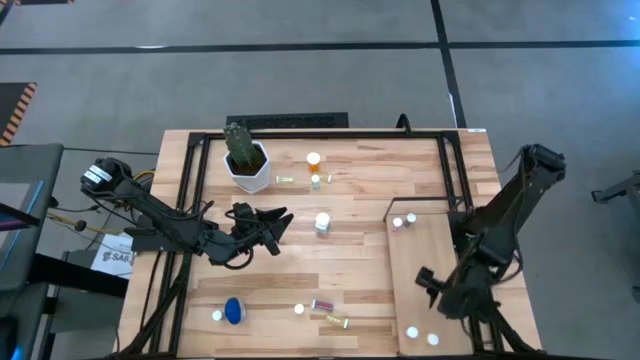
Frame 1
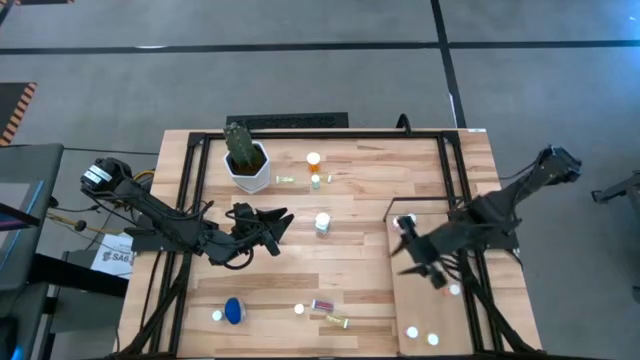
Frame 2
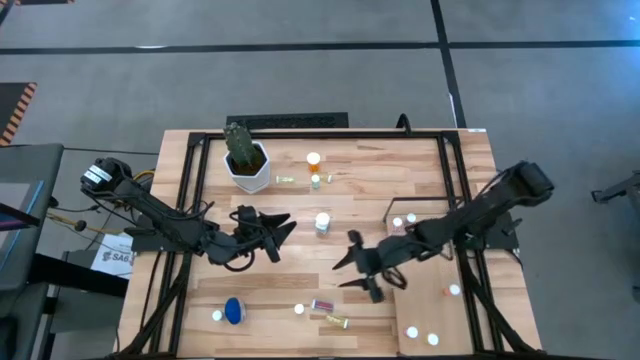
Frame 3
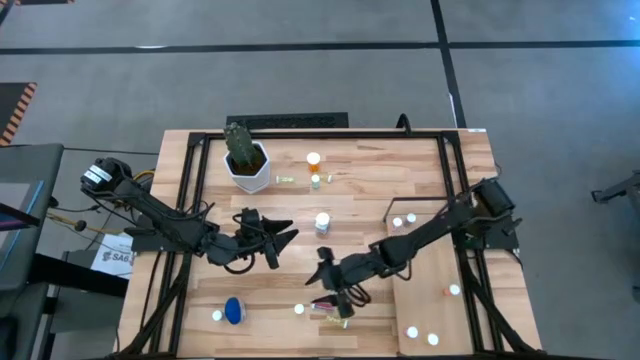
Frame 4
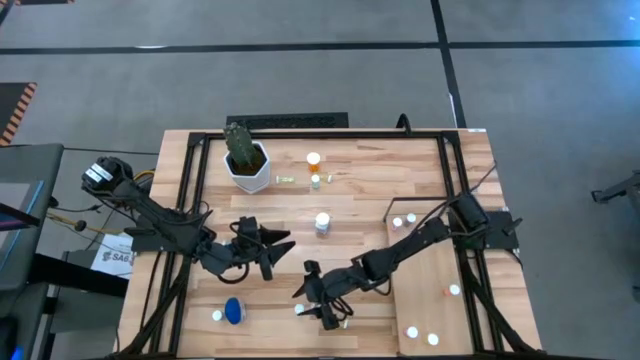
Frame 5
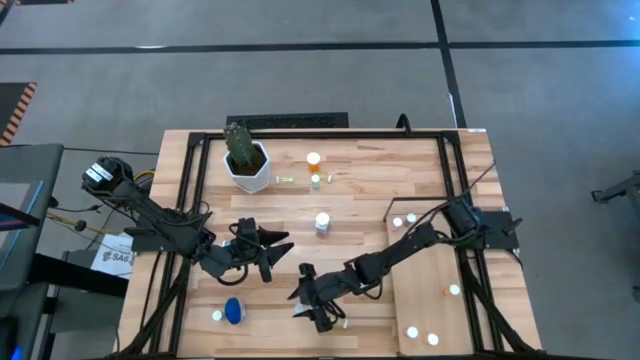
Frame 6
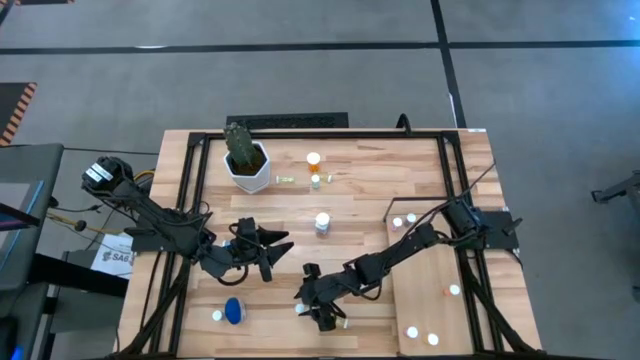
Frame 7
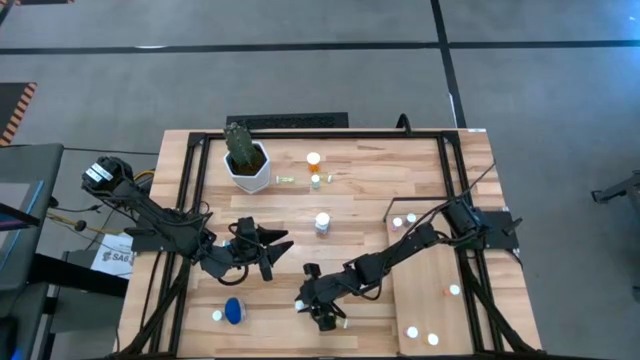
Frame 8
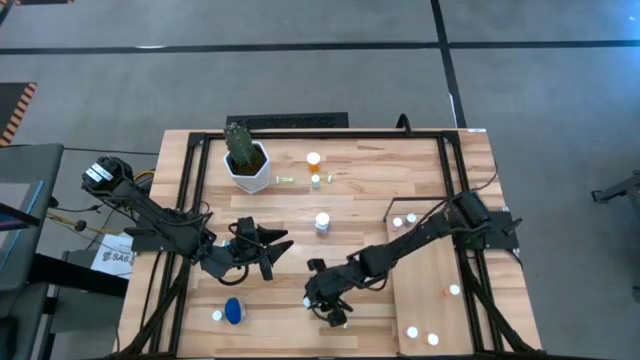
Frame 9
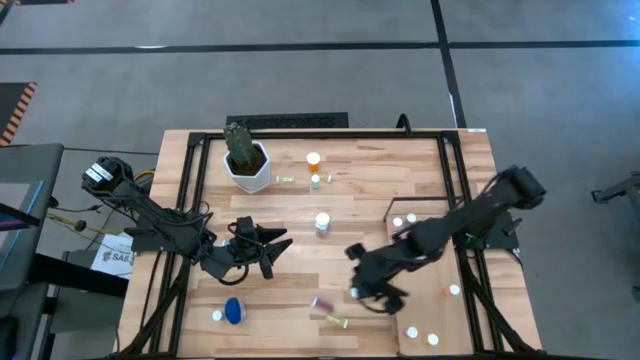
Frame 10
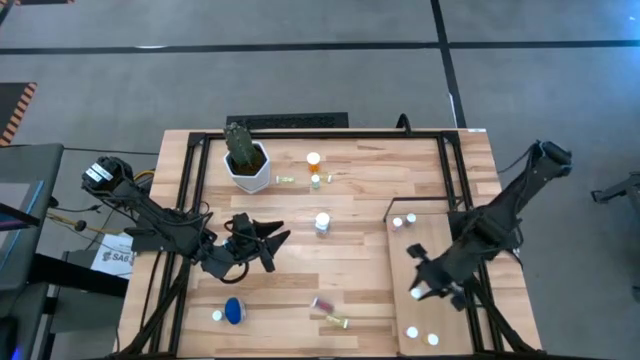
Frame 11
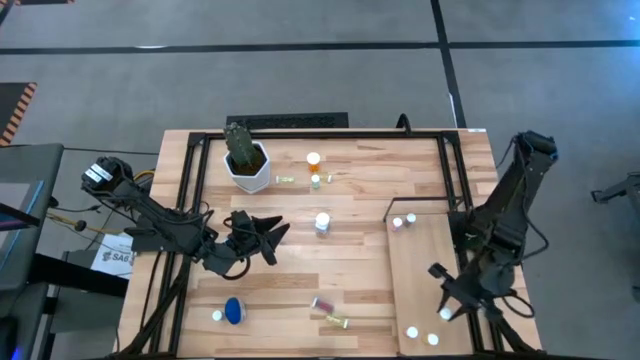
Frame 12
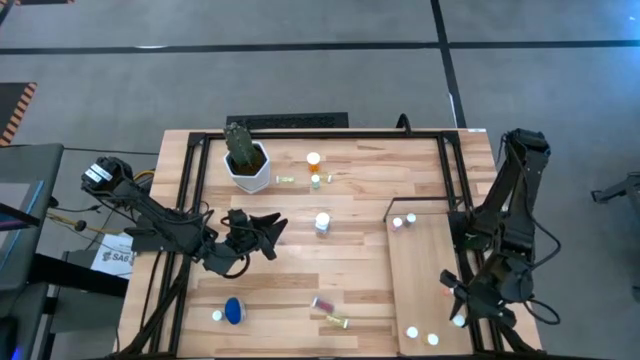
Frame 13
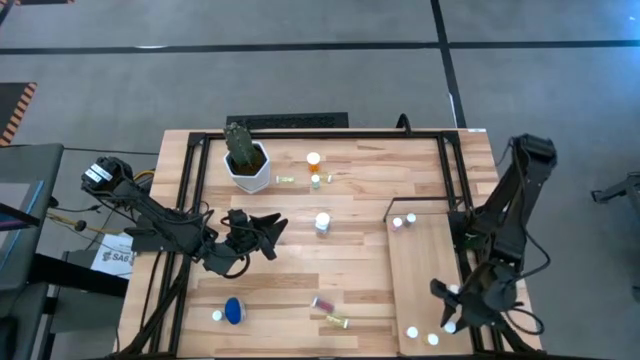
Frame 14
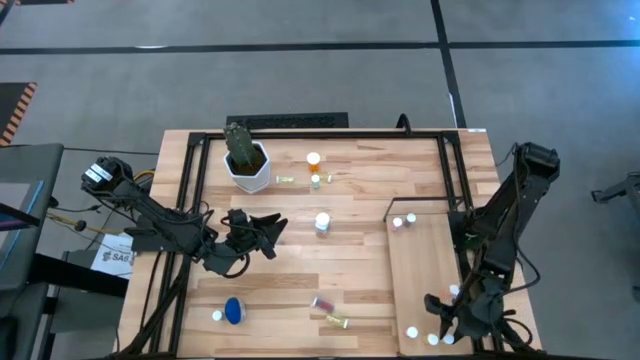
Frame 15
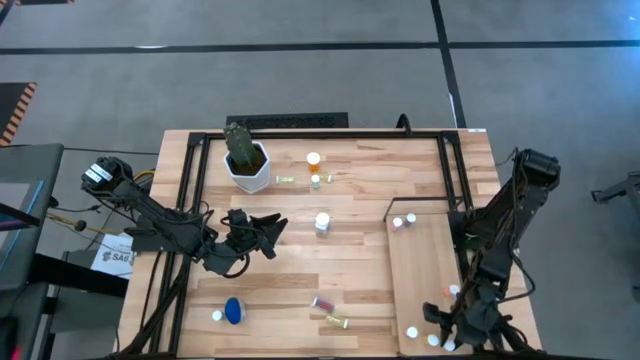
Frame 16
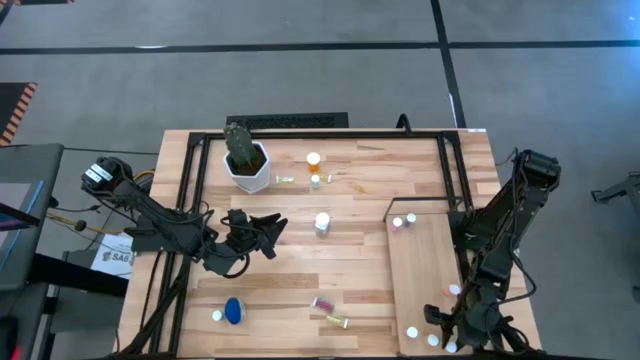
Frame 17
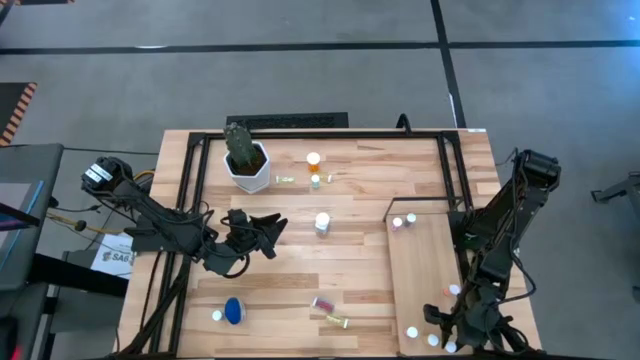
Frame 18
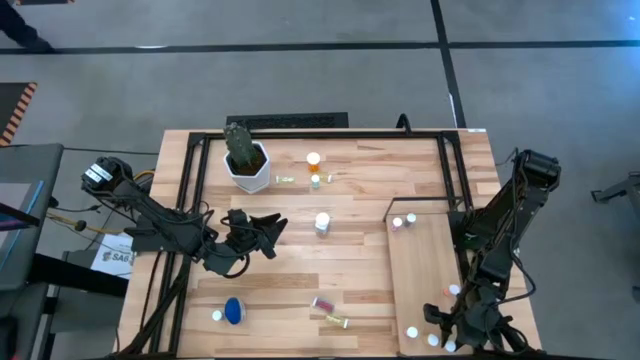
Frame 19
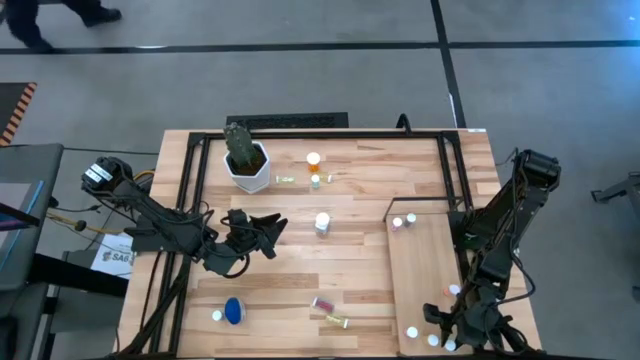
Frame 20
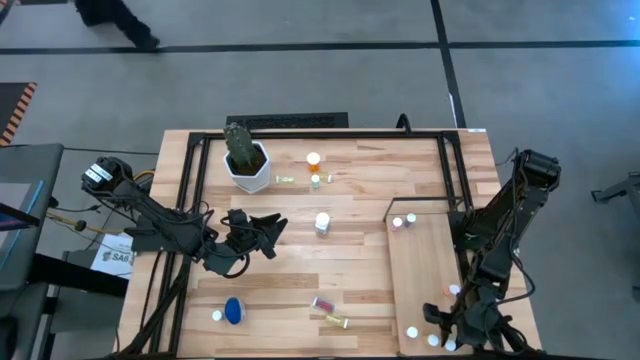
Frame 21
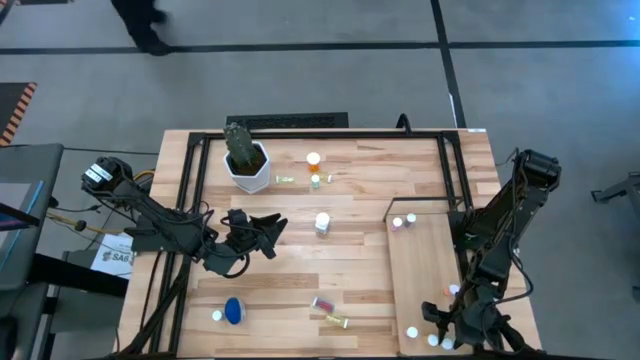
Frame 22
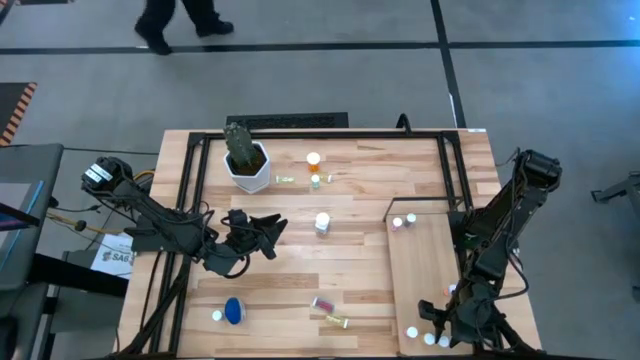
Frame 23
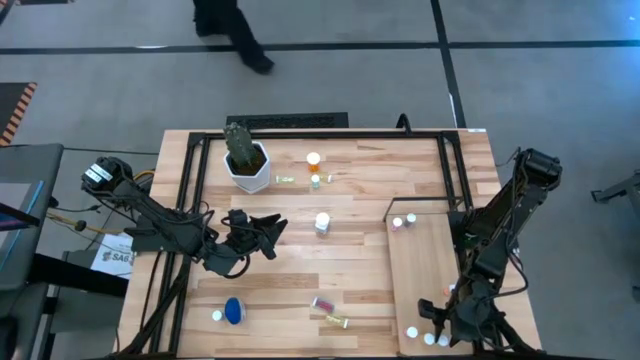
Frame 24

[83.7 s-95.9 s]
Task: Pick and place medicine bottles onto shelf by color
Put the yellow pill bottle on the shelf

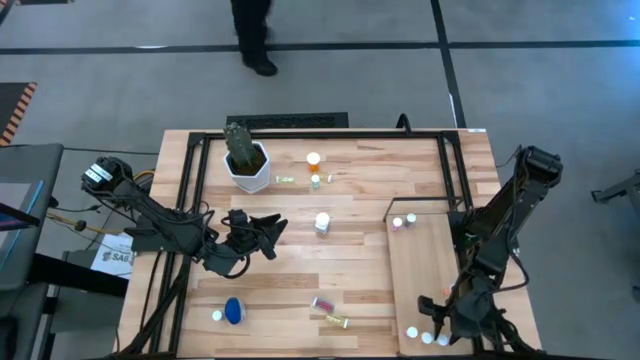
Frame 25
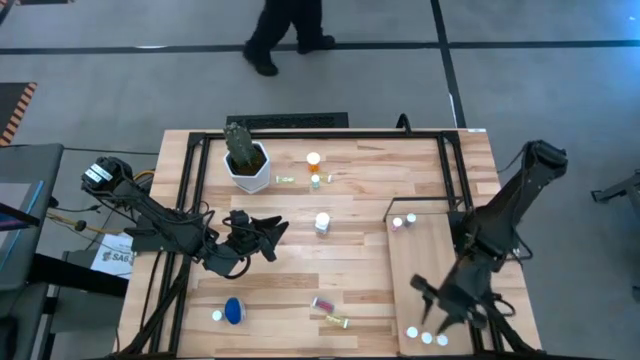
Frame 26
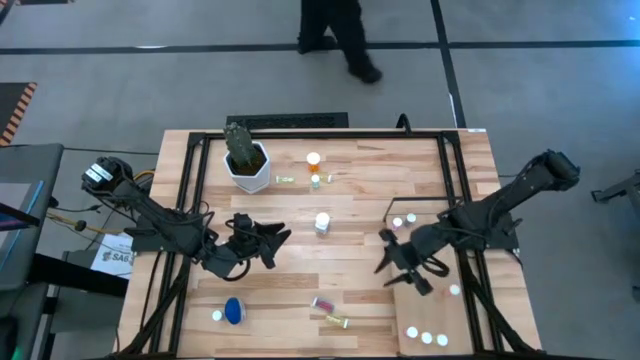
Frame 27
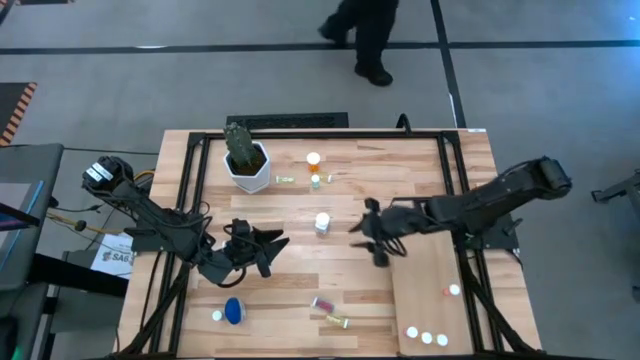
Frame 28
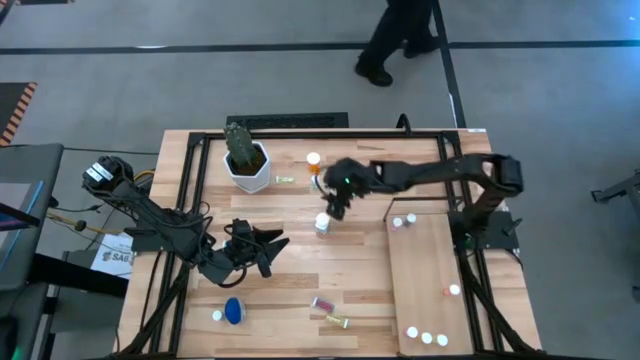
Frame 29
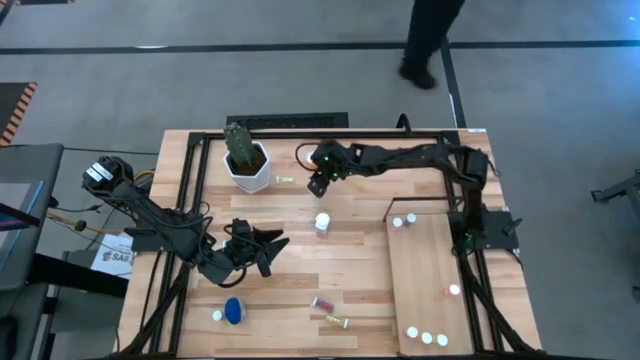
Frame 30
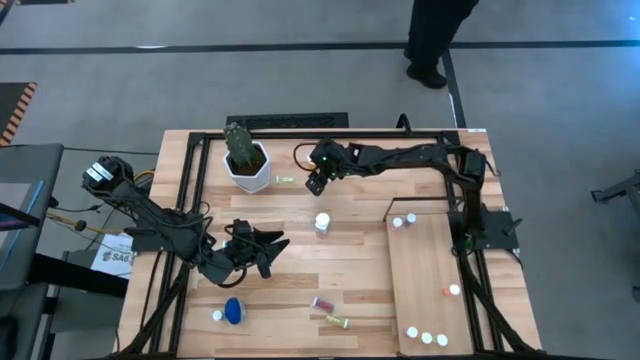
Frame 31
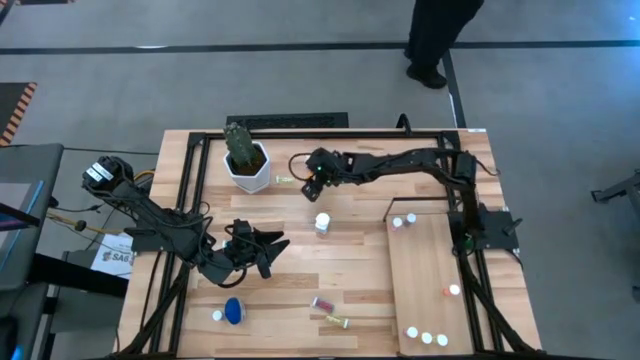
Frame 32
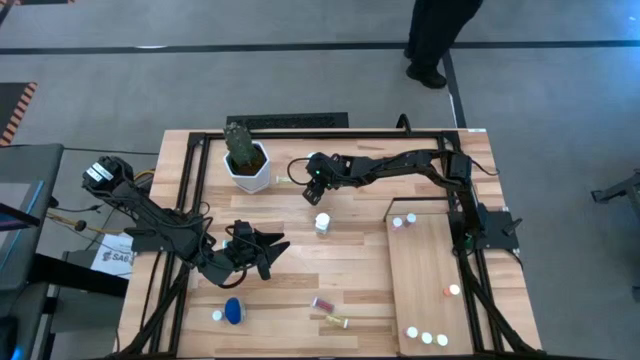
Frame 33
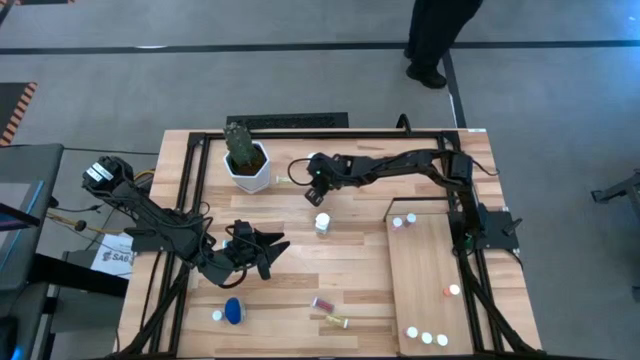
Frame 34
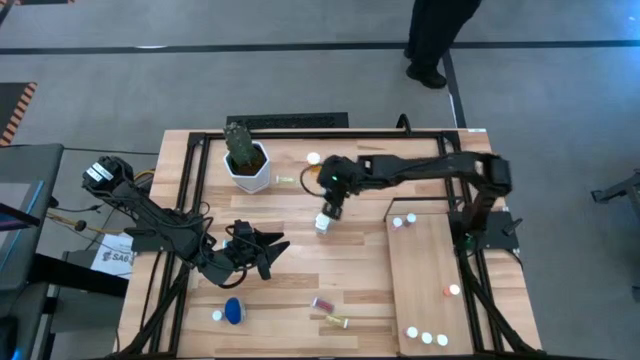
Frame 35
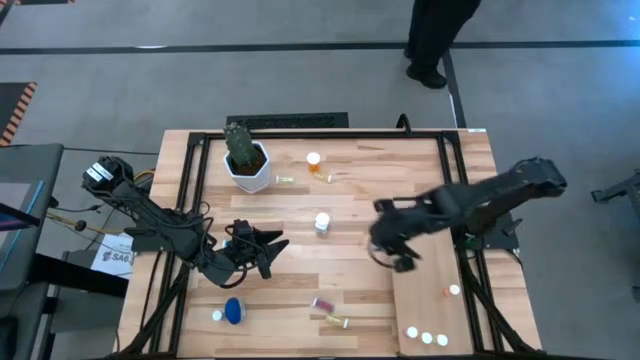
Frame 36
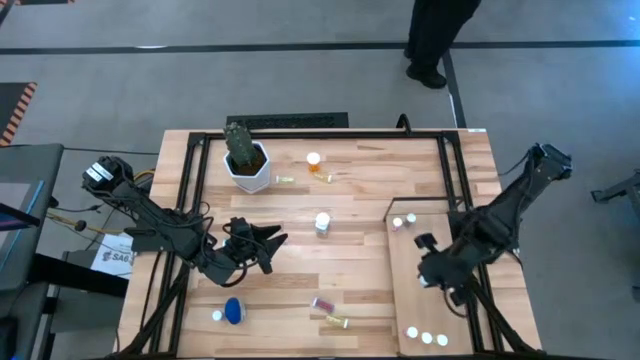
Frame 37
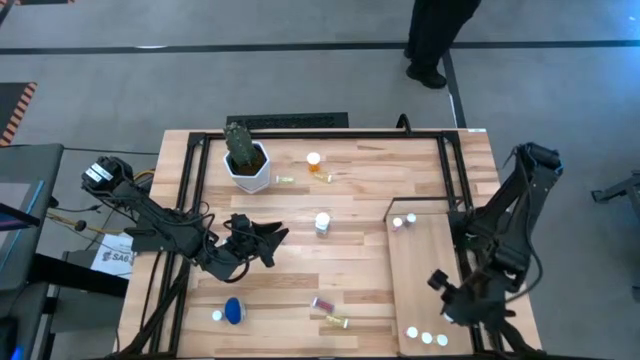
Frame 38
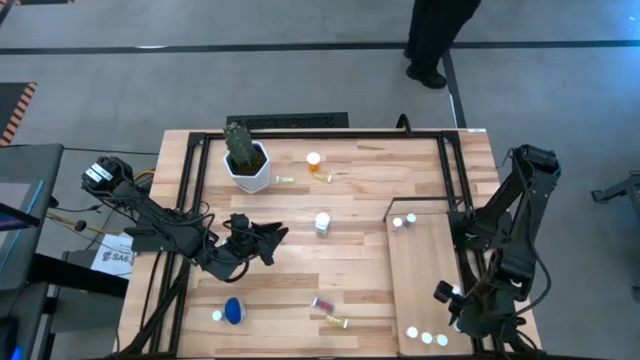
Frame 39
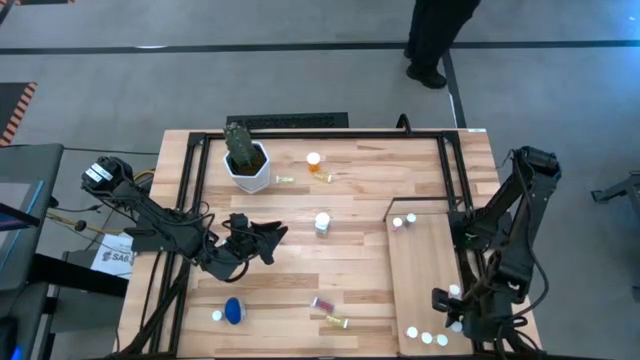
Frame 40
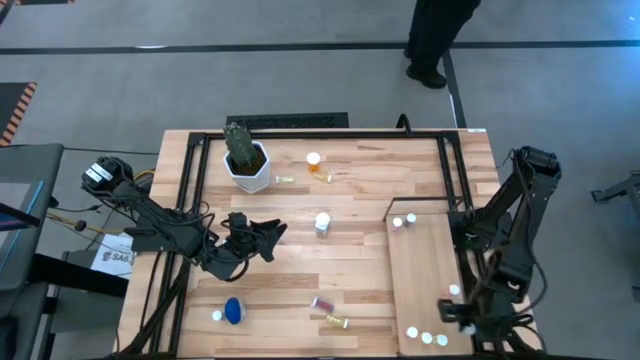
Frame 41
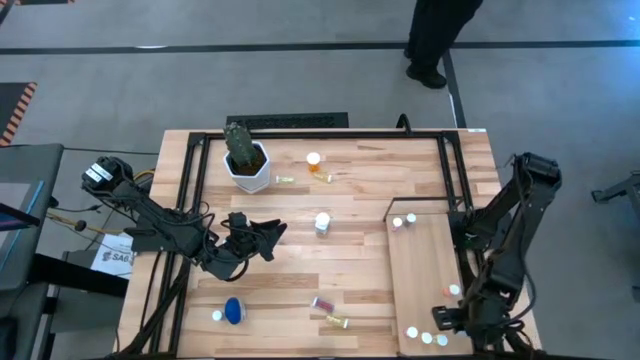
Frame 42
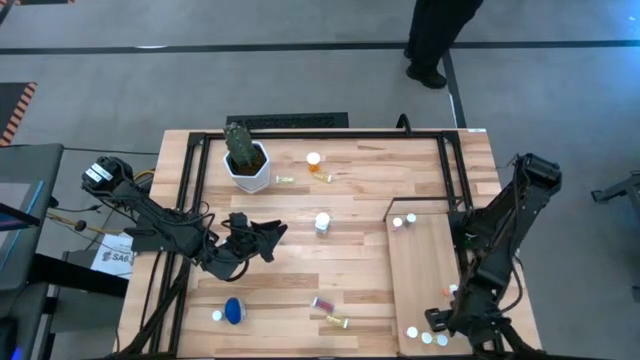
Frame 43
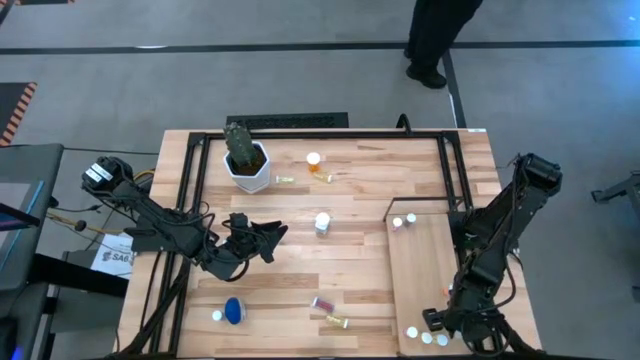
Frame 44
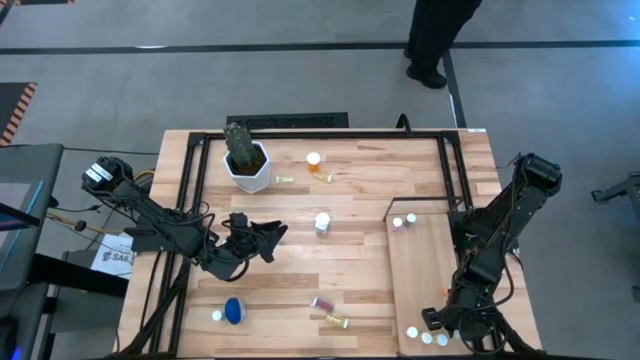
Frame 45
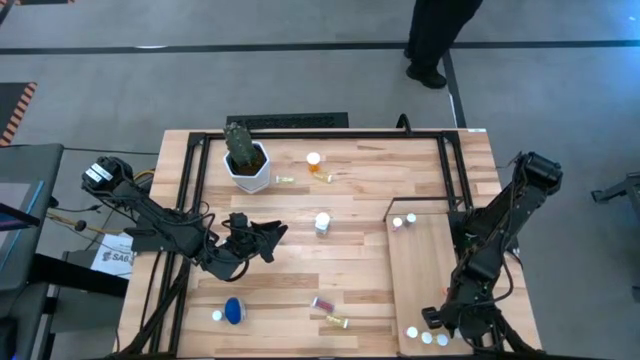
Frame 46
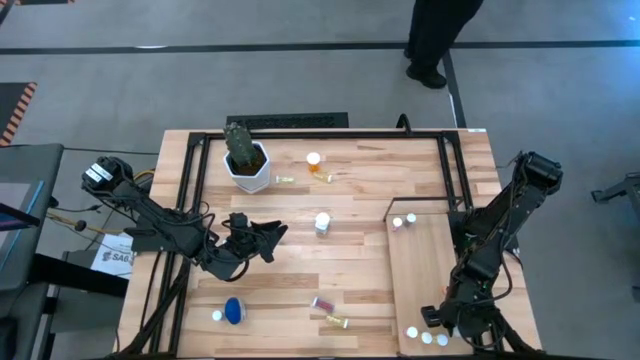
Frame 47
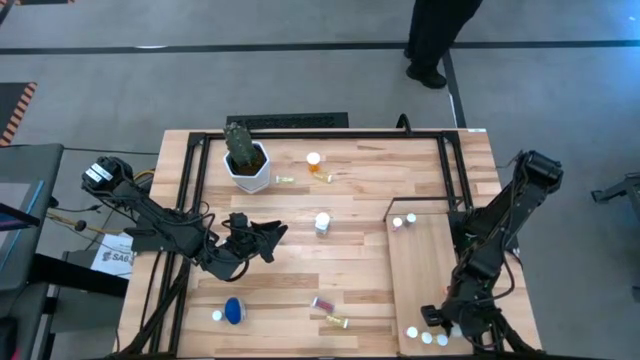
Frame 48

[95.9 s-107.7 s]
Put the blue pill bottle on the shelf
